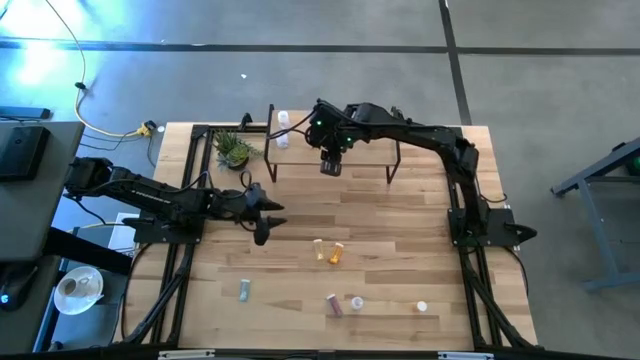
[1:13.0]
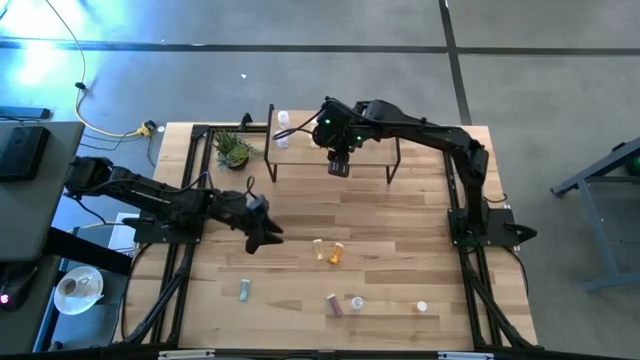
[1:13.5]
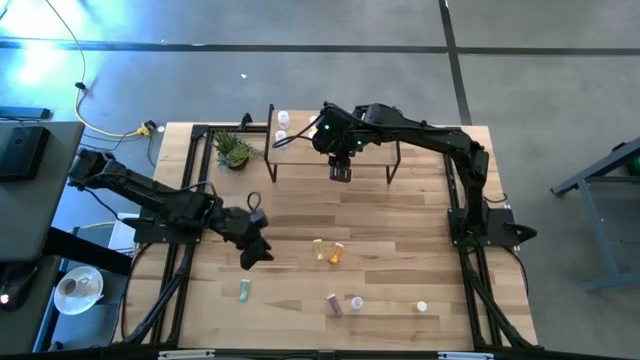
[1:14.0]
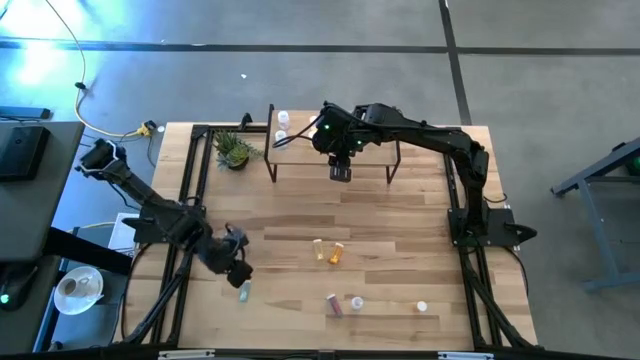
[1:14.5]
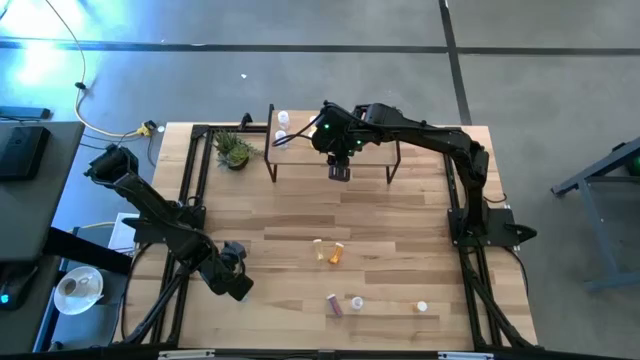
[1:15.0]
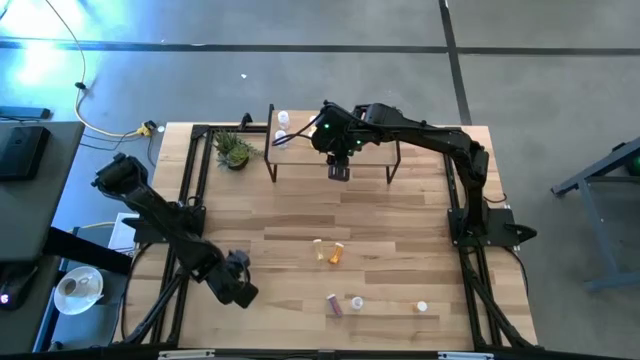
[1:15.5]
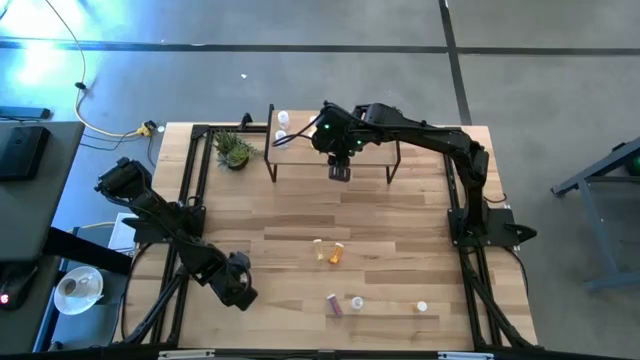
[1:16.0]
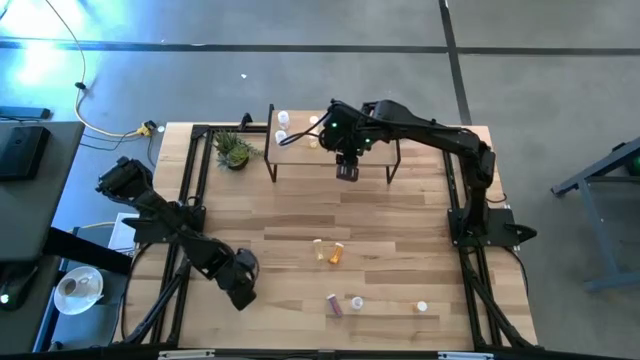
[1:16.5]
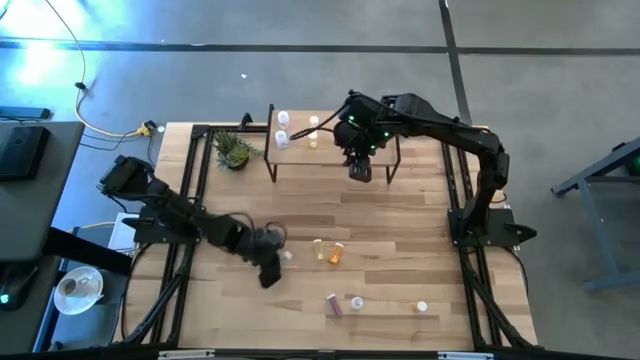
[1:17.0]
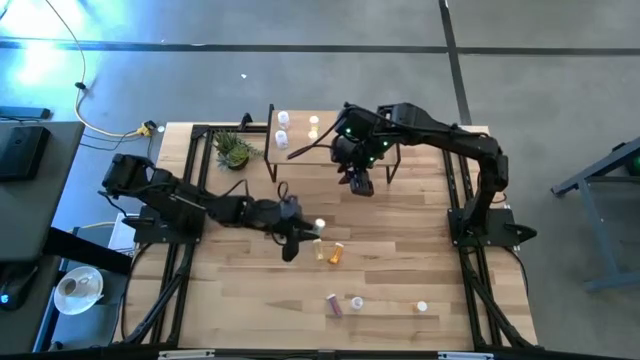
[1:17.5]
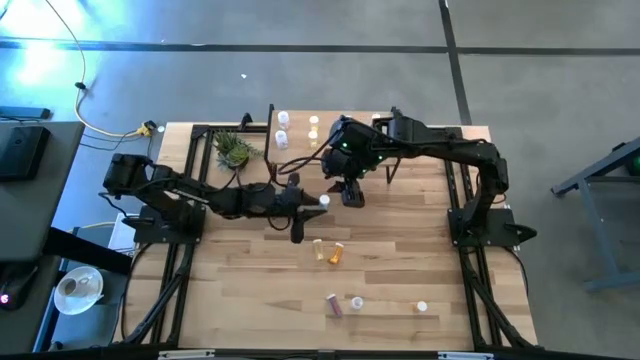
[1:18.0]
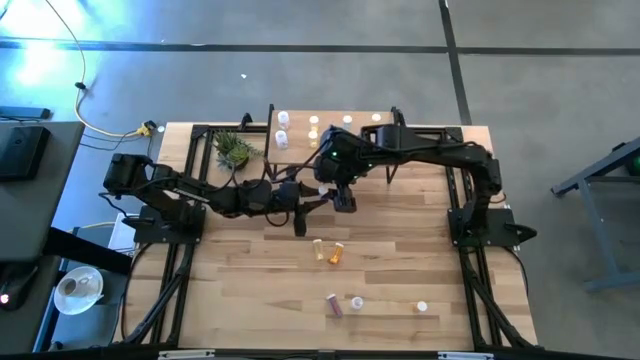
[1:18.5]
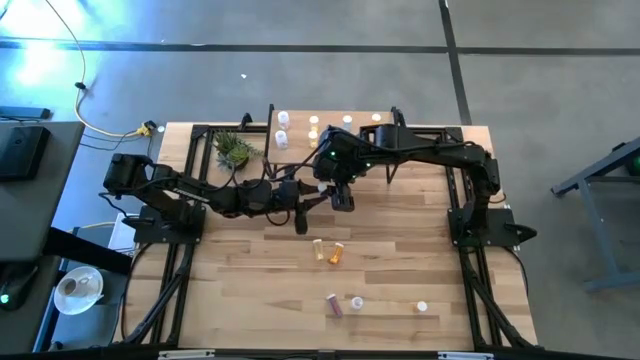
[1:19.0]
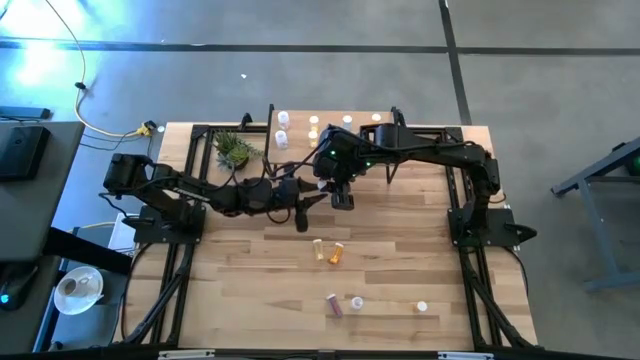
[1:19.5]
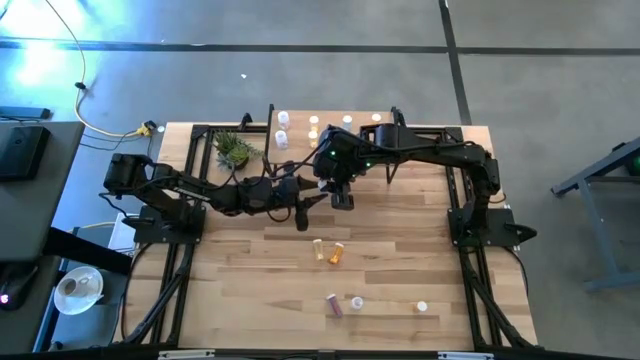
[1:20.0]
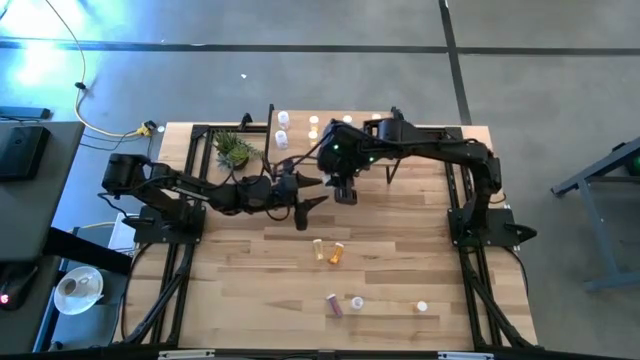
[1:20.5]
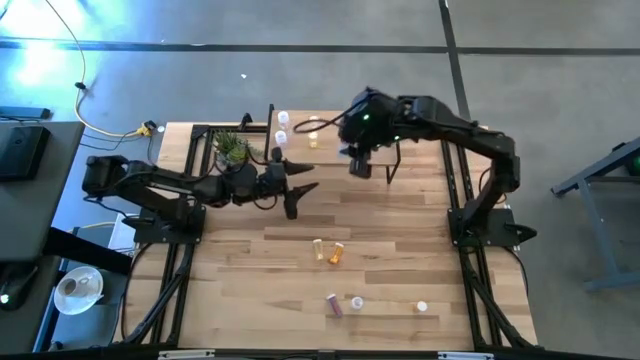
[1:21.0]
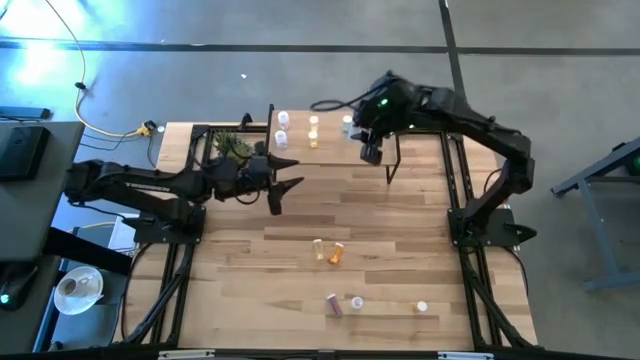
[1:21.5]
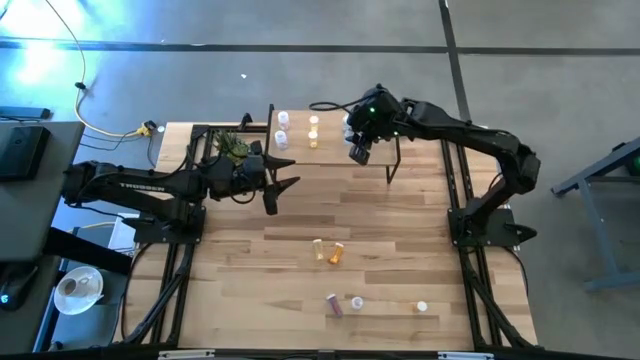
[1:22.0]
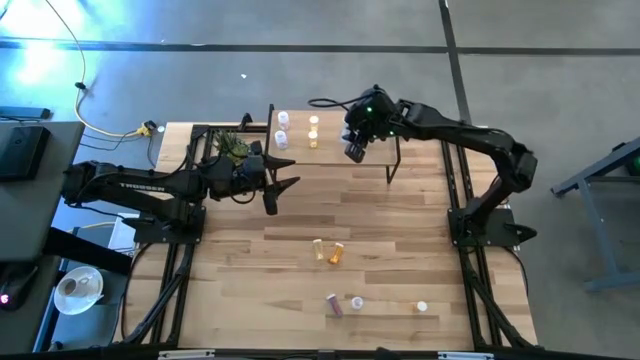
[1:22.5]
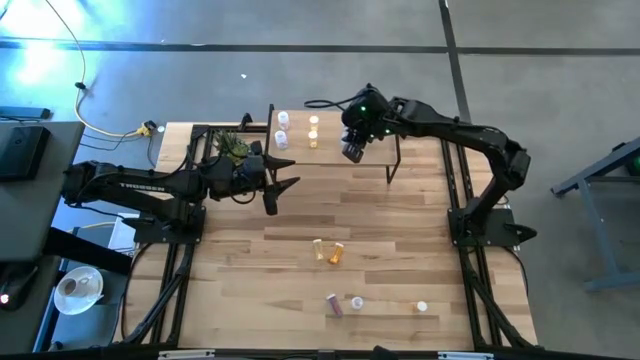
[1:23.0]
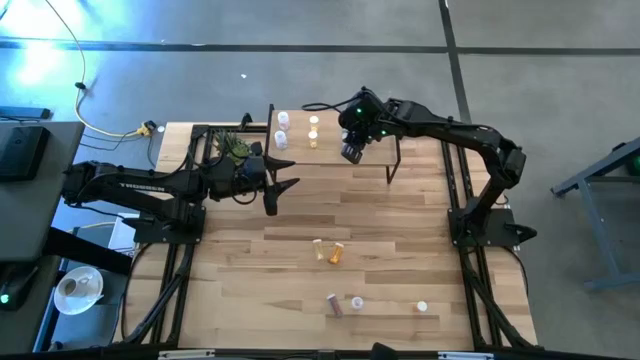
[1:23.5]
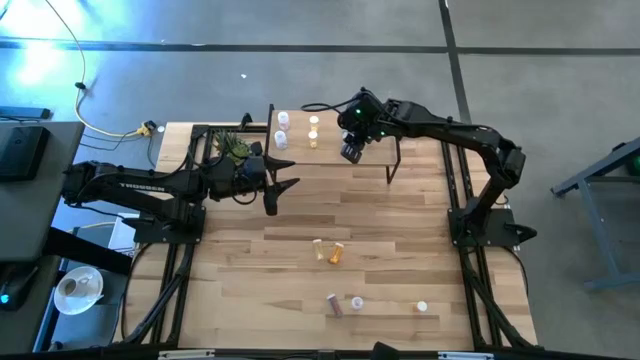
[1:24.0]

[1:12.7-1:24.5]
Task: Pick and place medicine bottles onto shelf by color
Put the blue pill bottle aligned with the other blue pill bottle on the shelf

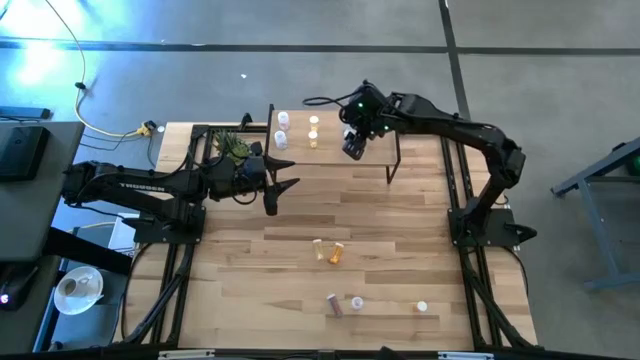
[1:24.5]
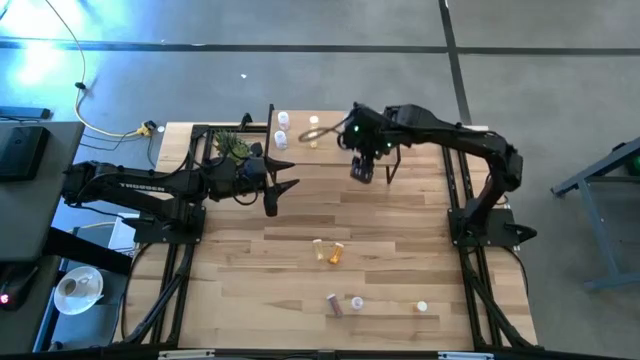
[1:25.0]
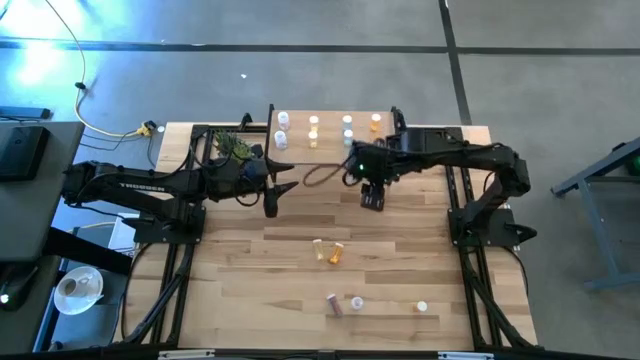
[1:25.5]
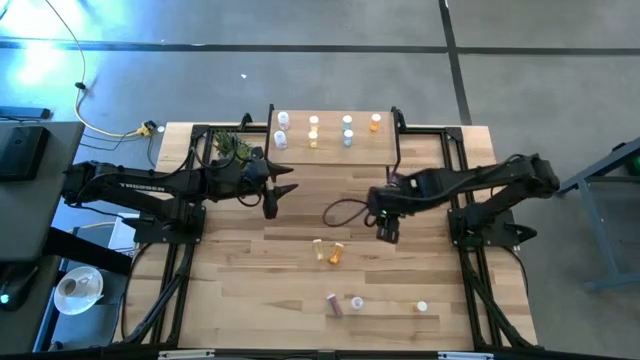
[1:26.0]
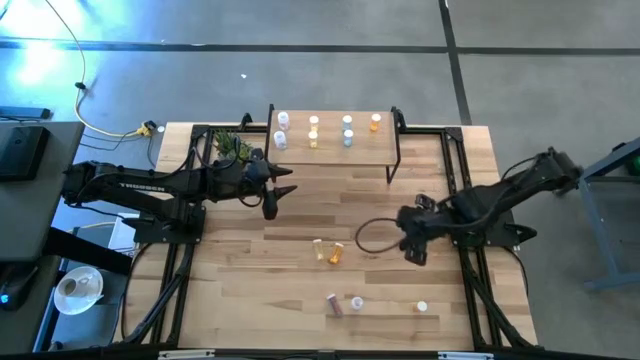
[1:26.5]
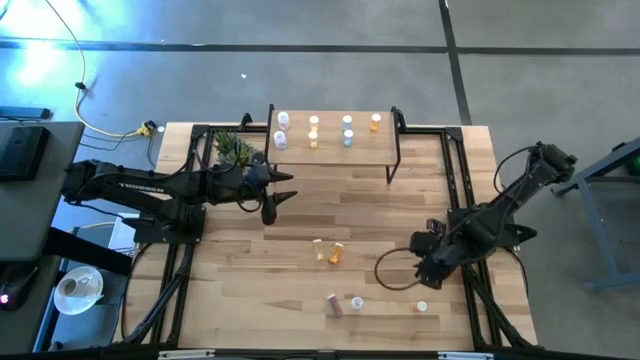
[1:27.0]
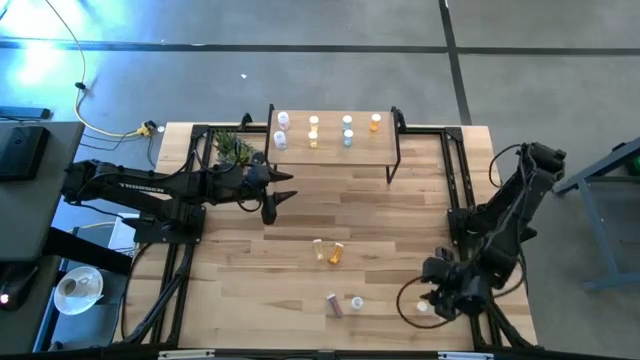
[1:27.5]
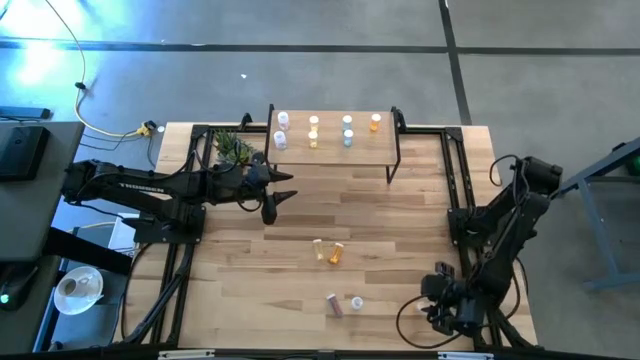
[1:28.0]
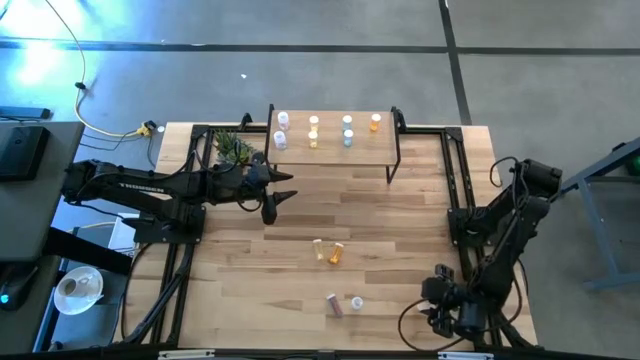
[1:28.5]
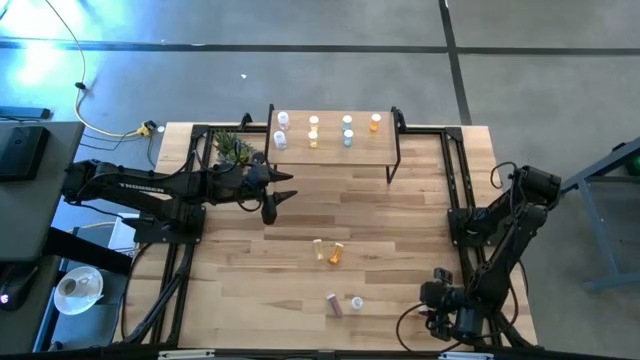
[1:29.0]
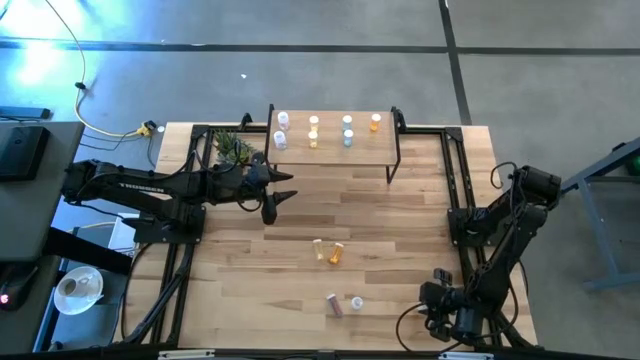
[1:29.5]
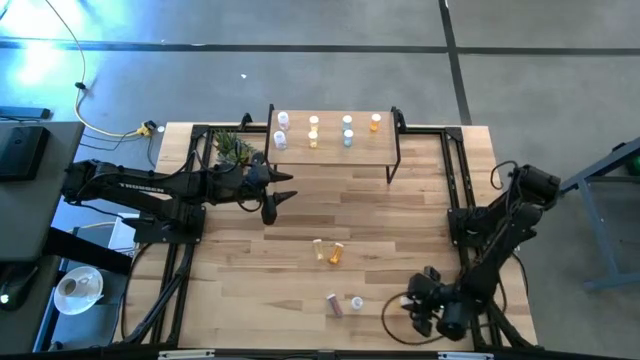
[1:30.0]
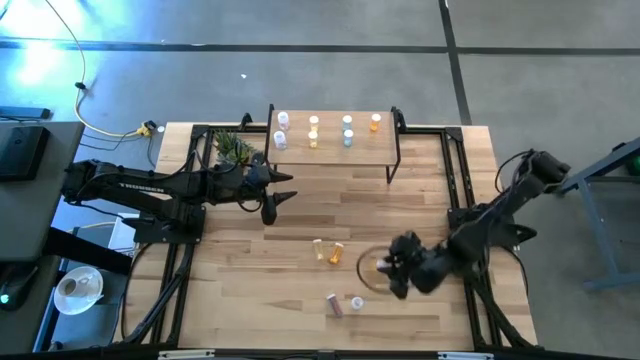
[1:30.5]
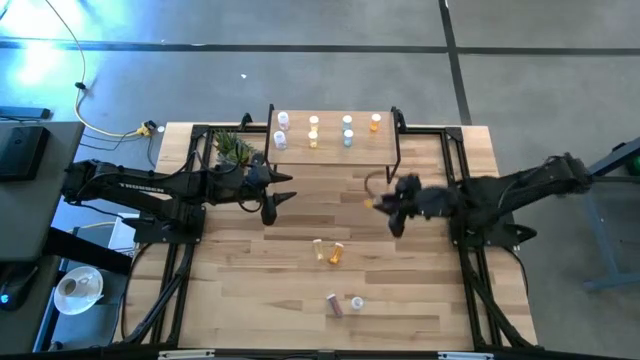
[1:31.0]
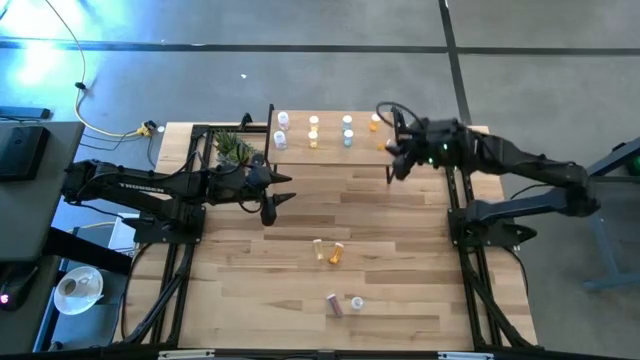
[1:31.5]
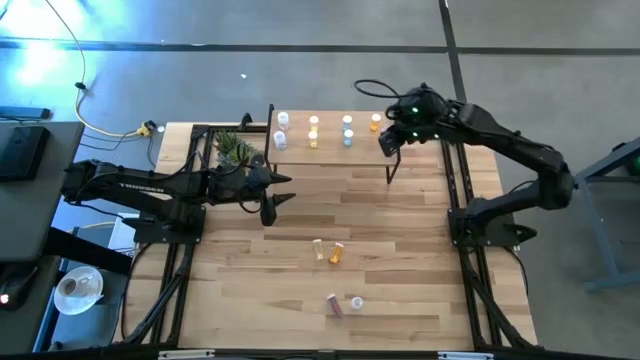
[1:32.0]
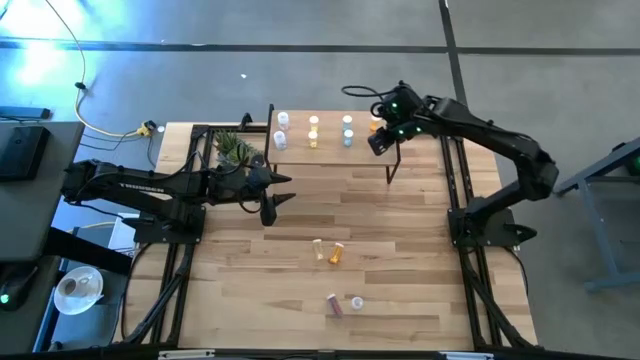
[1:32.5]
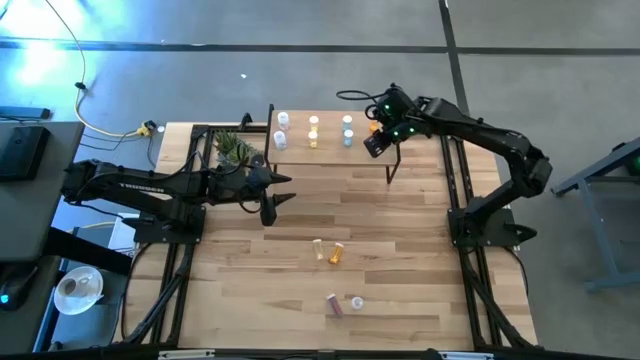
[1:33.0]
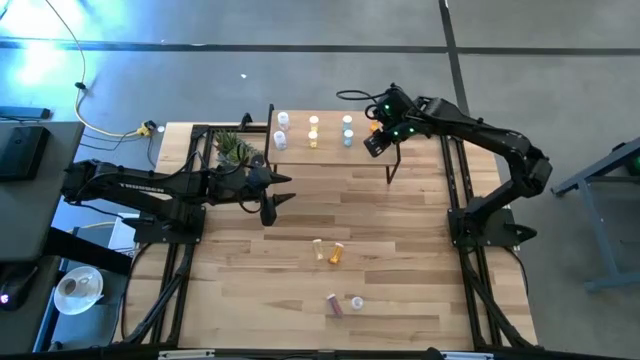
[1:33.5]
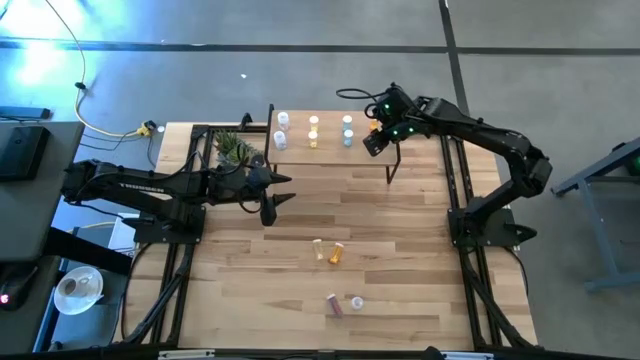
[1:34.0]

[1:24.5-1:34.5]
Put the orange pill bottle aligned with the other orange pill bottle on the shelf

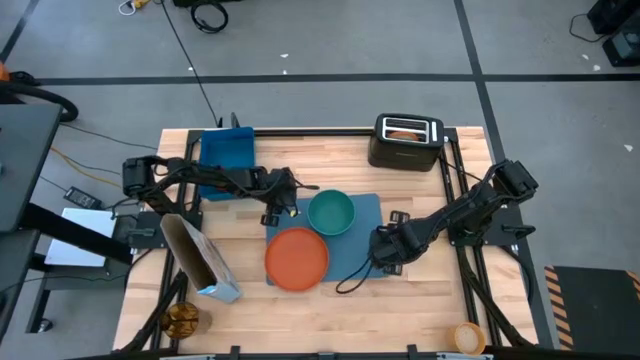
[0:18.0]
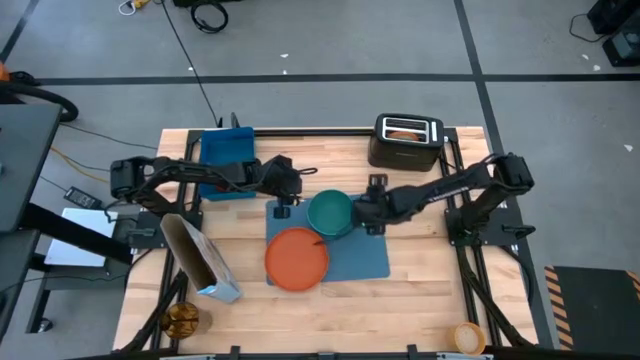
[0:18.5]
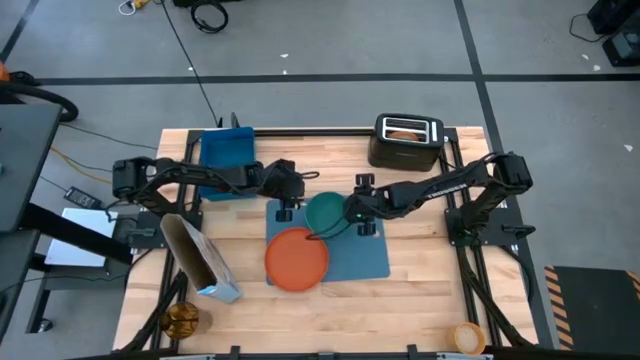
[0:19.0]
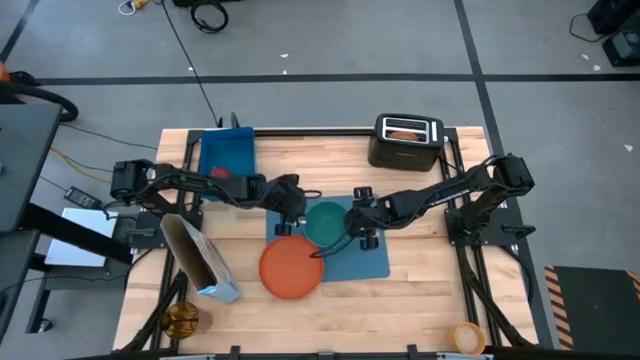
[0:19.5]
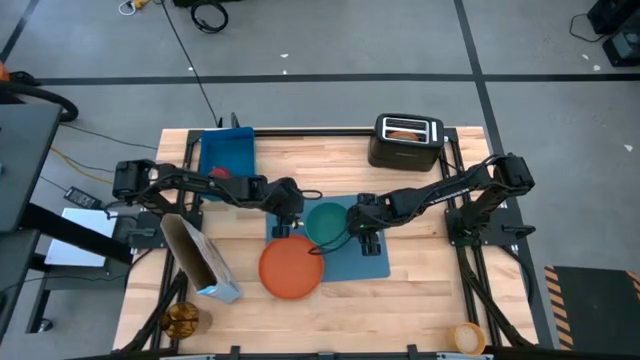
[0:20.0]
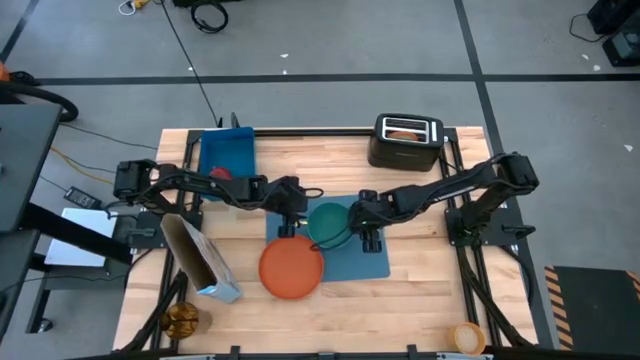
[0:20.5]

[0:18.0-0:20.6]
Task: Arrange a breakfast setting
Adjust the green bowl on the blue table mat
